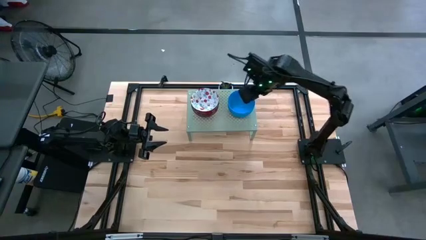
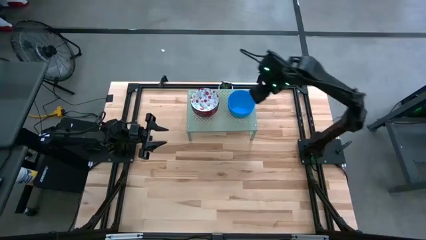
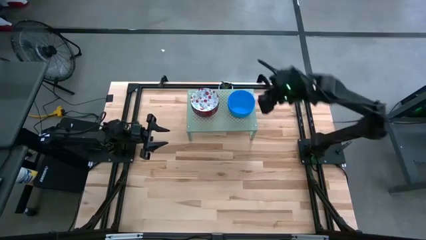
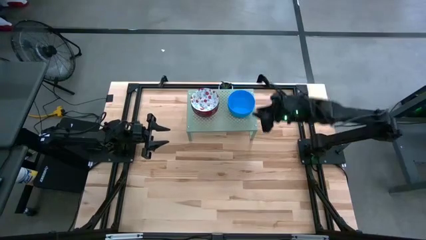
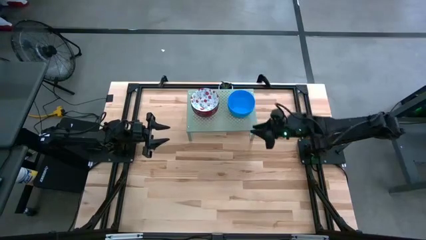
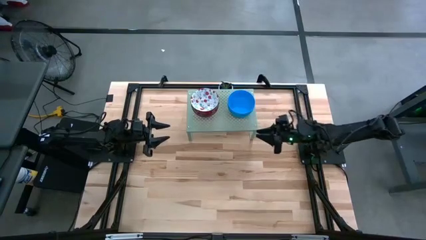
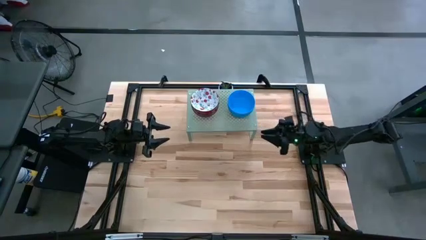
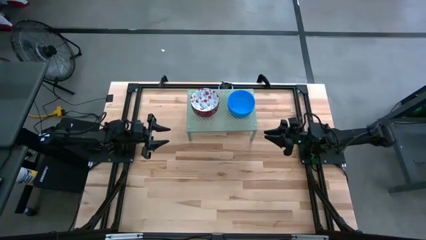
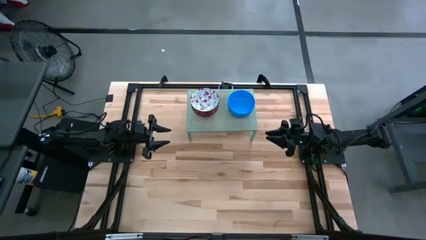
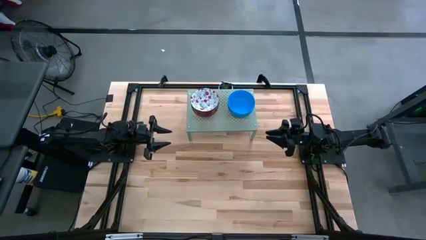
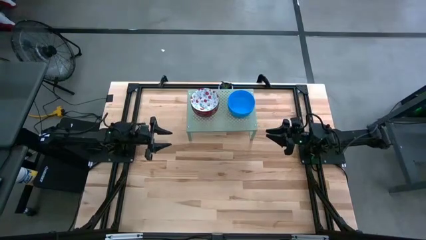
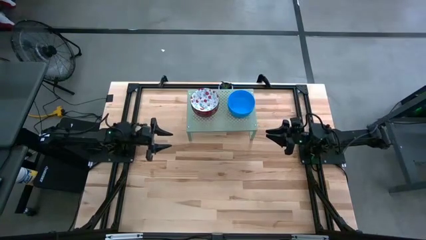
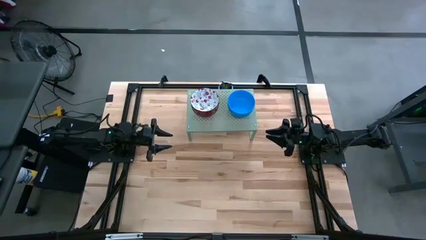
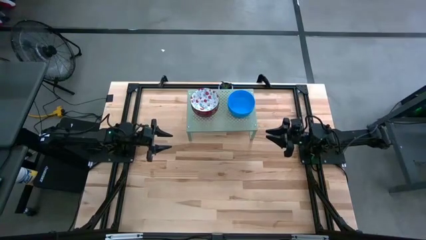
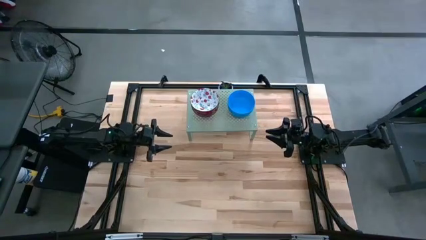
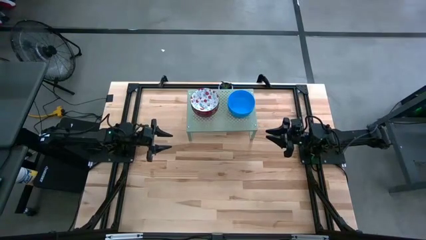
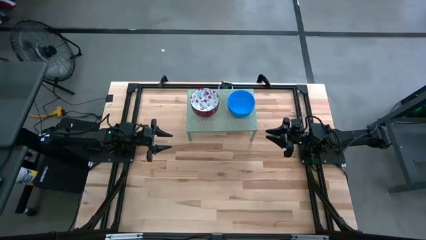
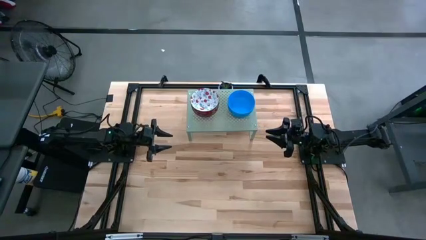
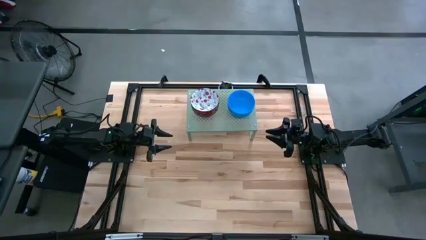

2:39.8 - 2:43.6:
Task: Pick & Place Mini bowls
Return to Home Position

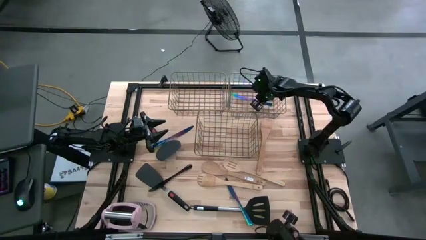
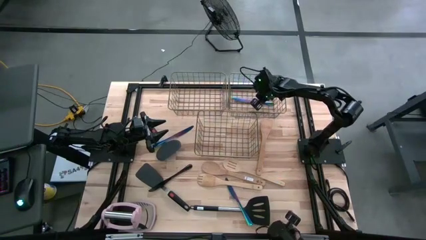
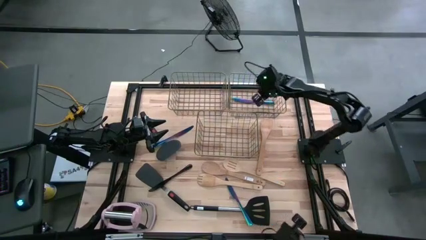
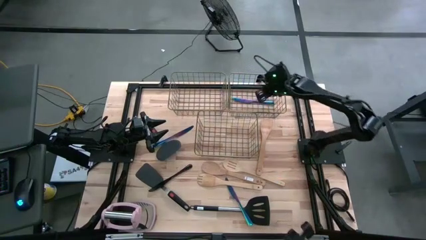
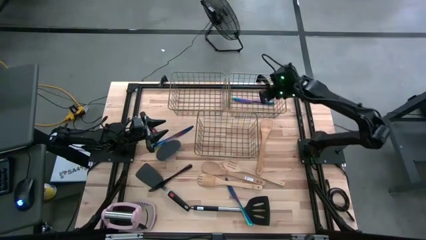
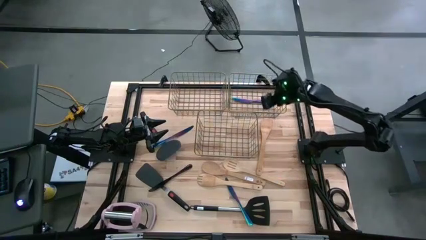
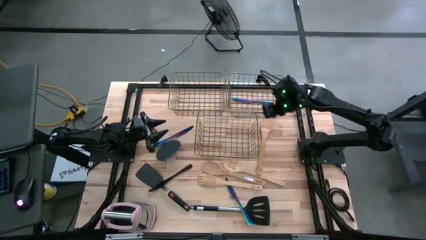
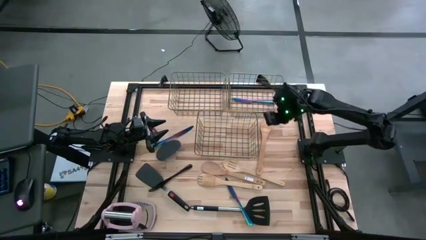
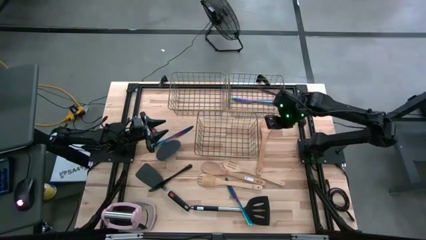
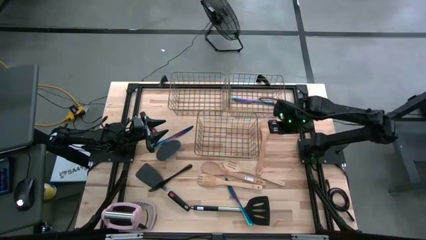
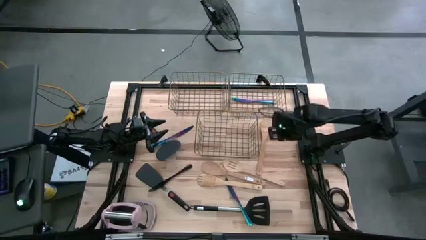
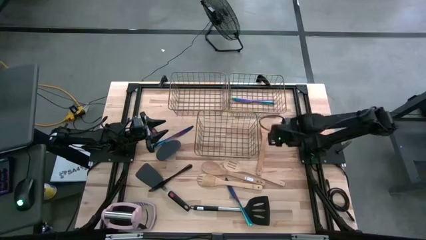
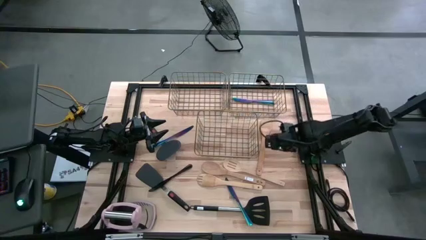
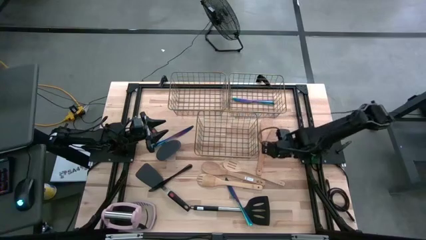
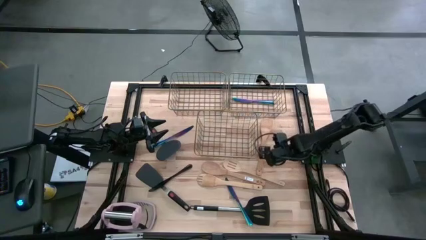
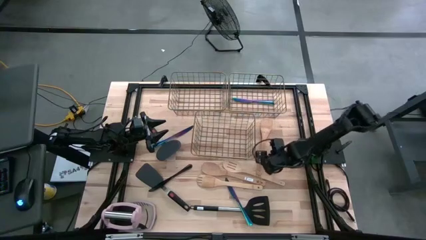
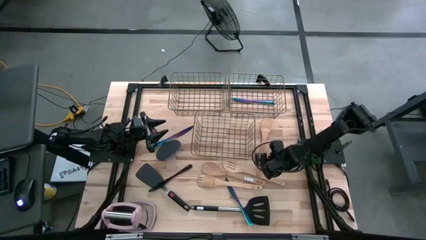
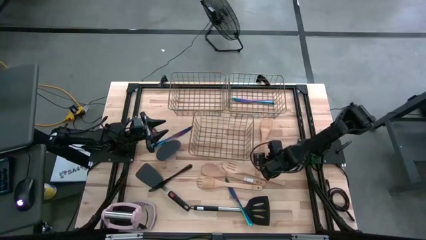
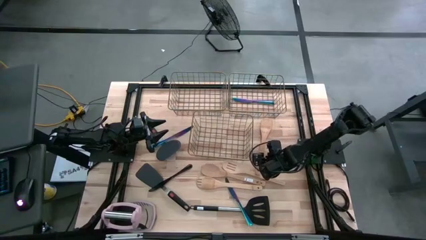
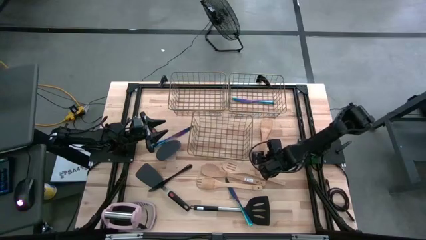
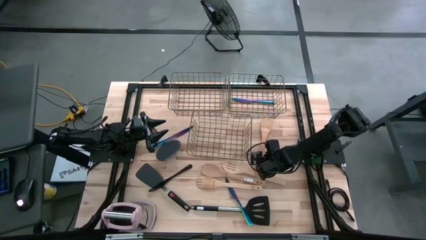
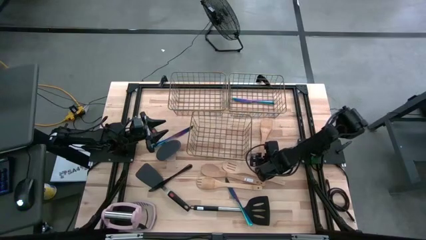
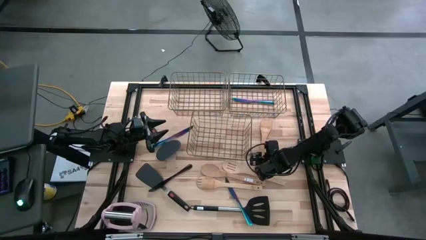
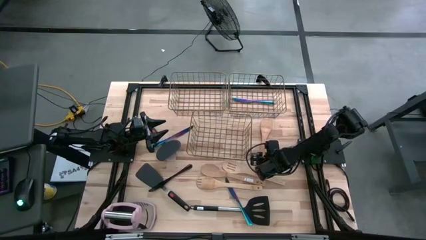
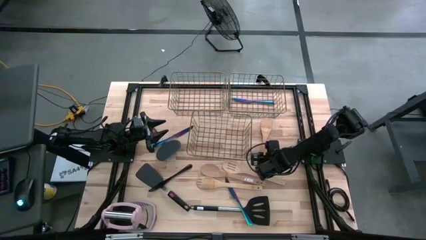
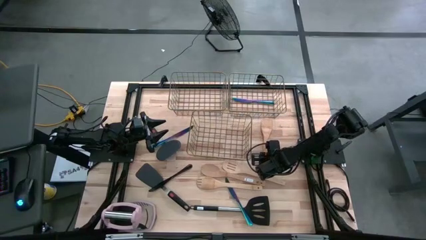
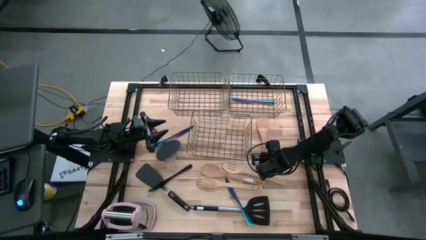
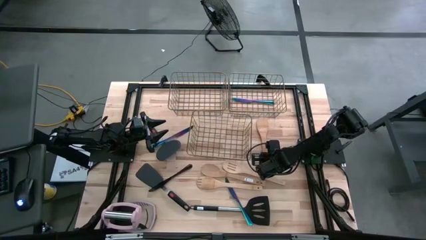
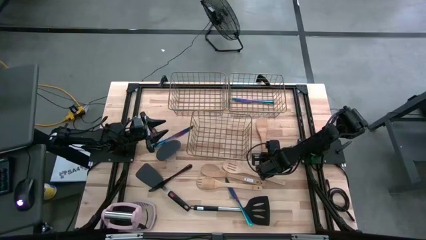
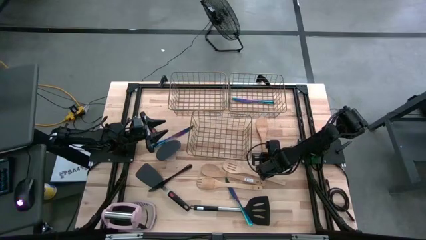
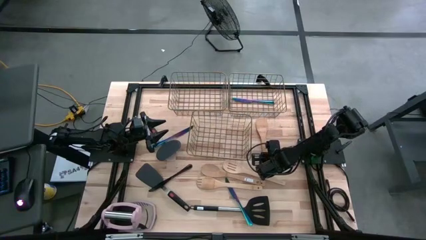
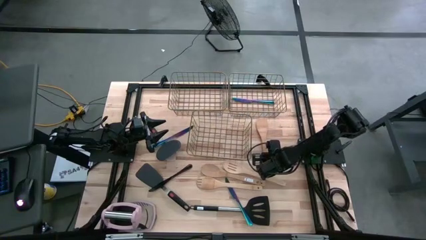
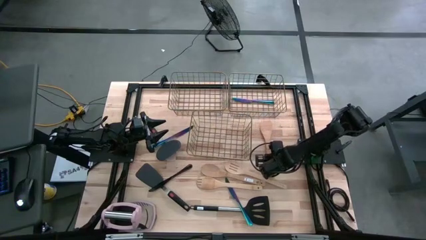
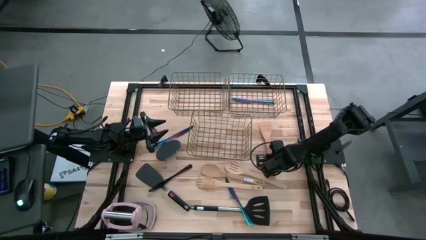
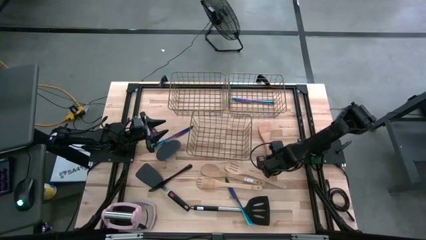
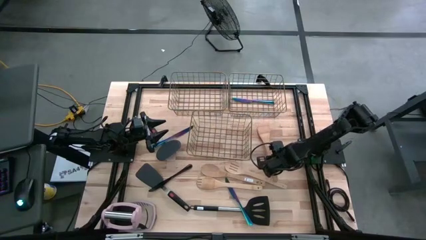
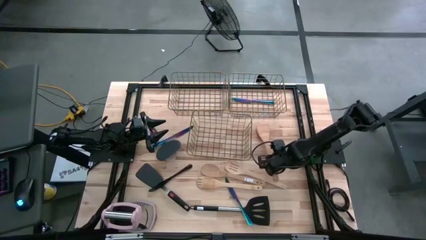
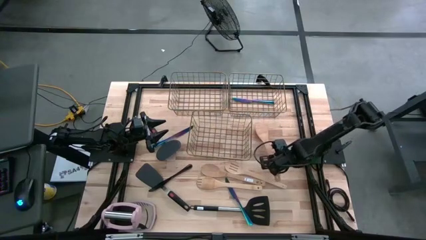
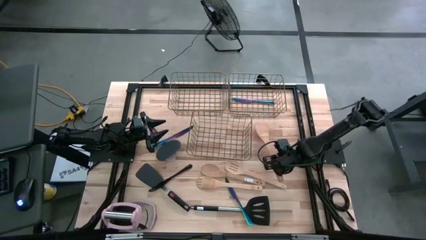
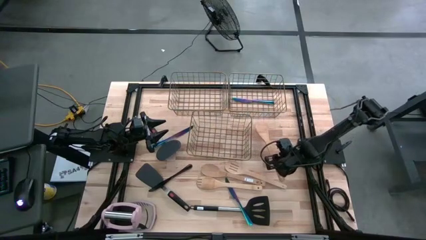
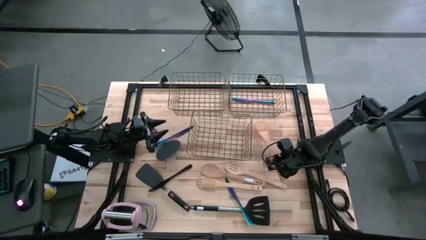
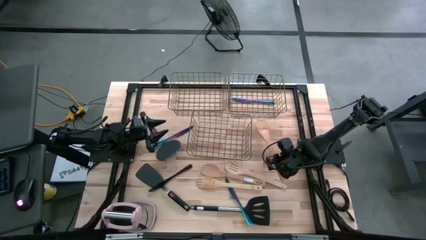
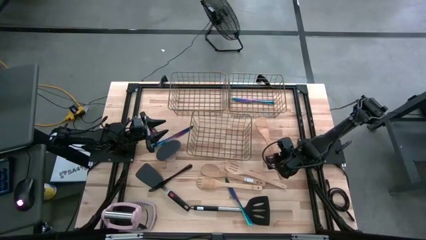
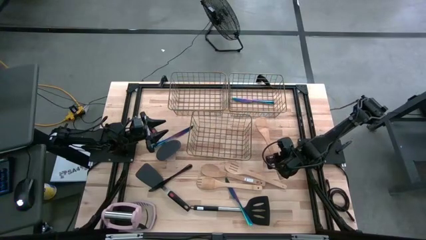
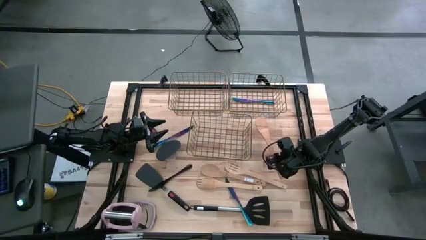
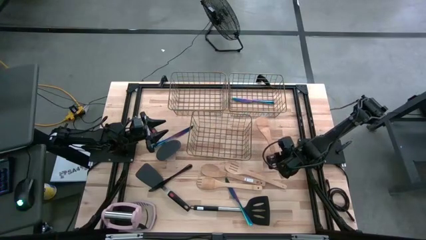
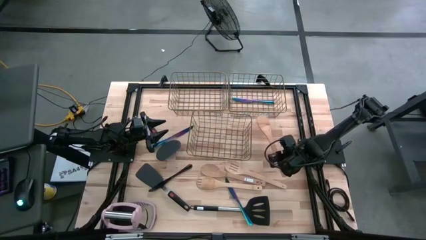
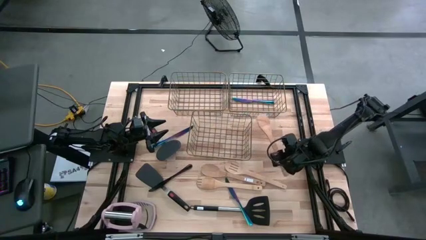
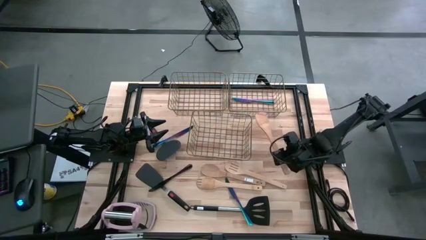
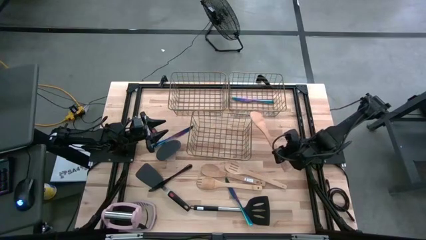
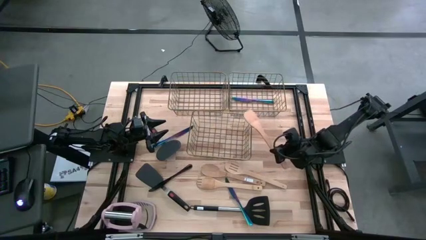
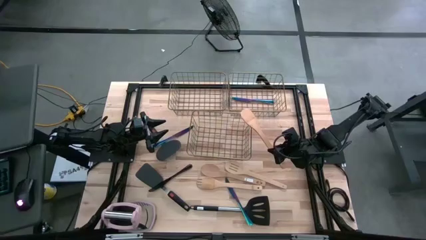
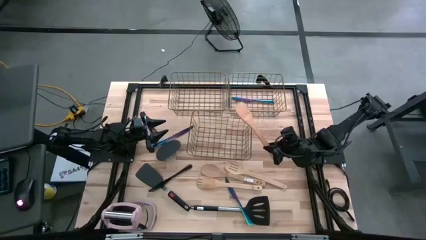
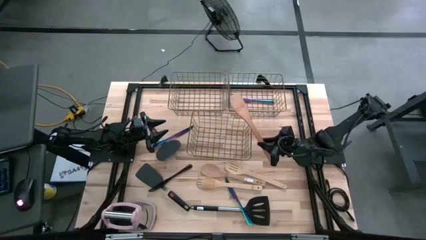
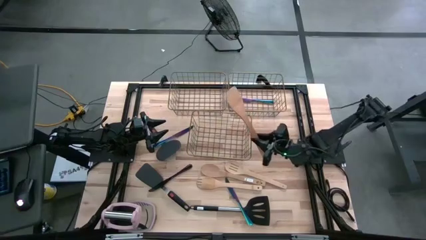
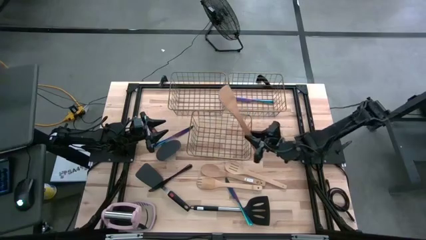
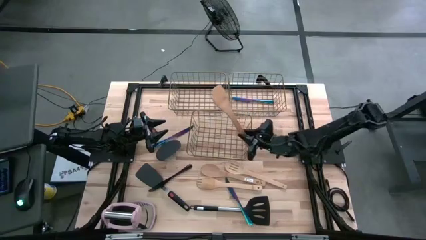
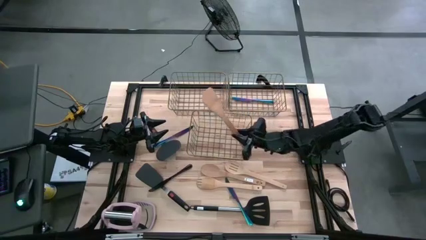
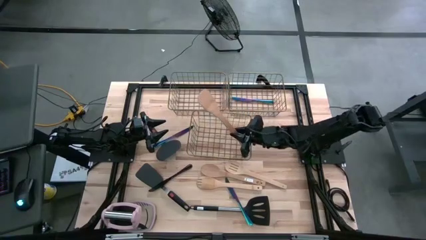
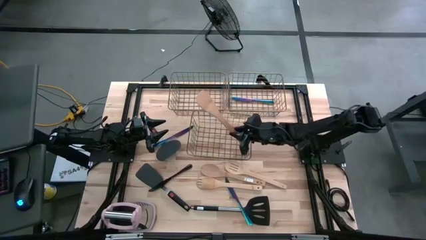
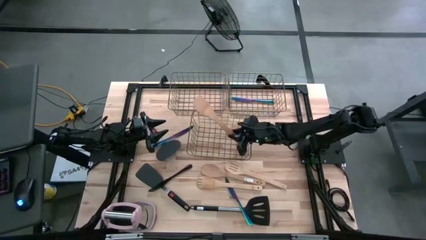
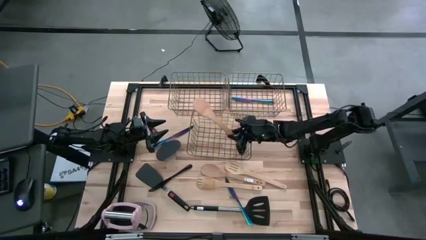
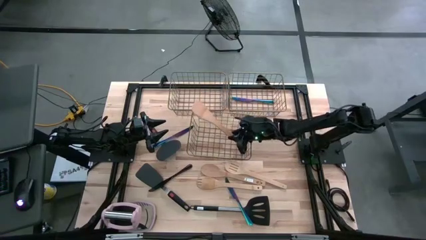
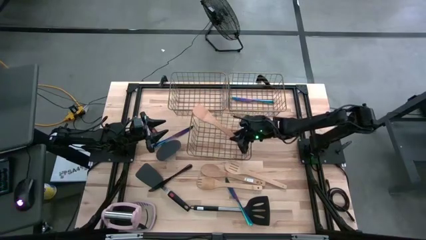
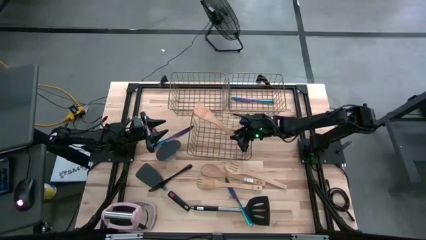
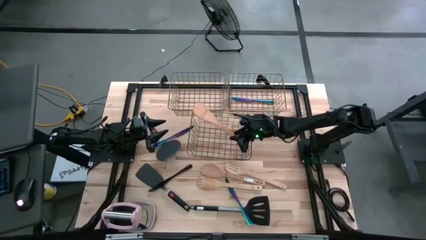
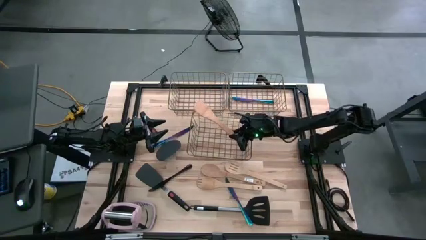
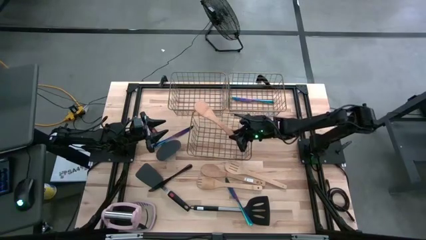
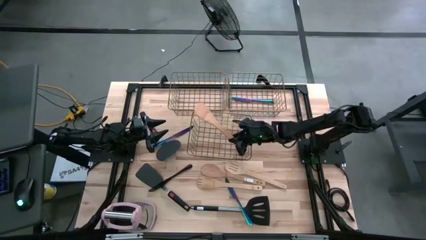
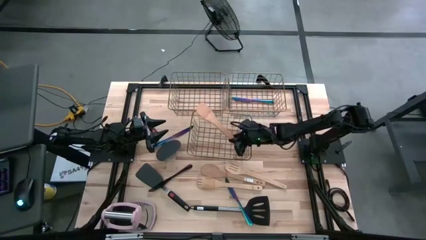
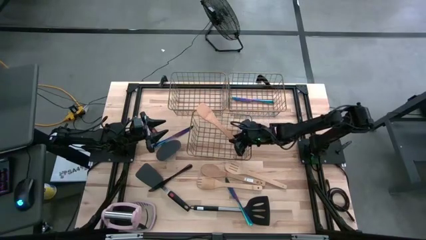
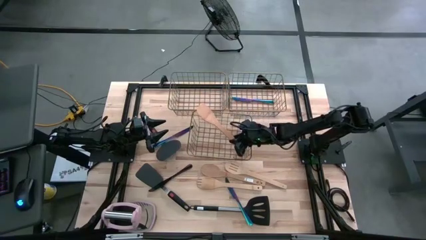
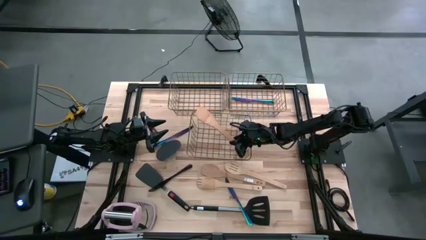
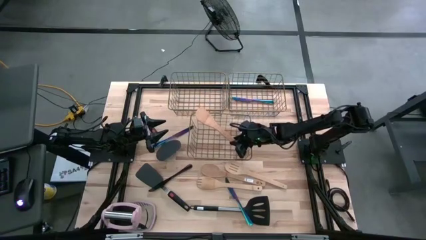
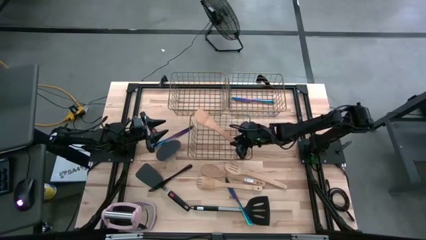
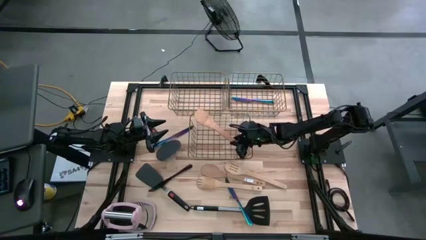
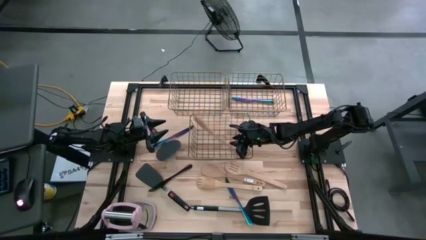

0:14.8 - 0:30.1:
Task: Pick & Place Kitchen Items
Put the wooden spatula into the bottom wire basket
